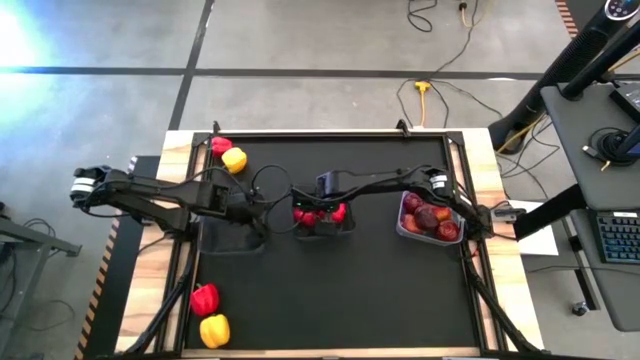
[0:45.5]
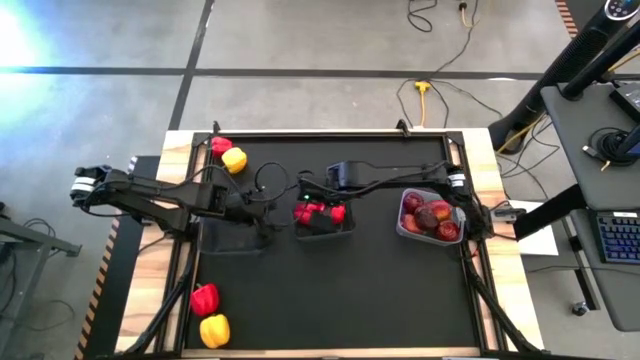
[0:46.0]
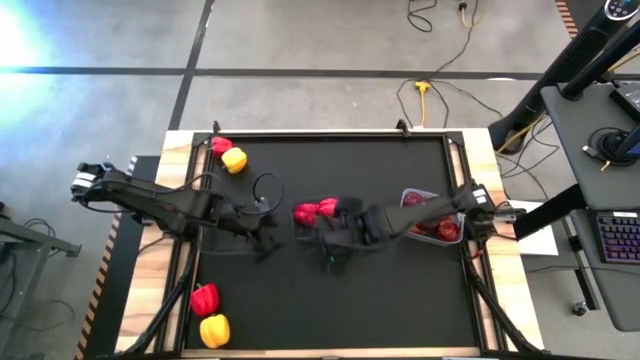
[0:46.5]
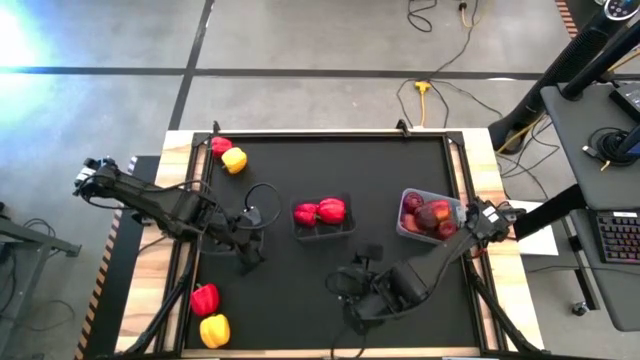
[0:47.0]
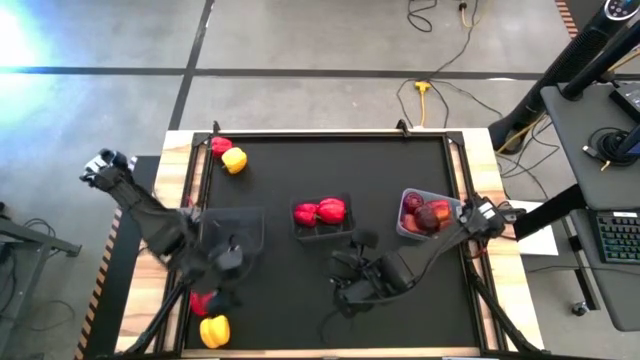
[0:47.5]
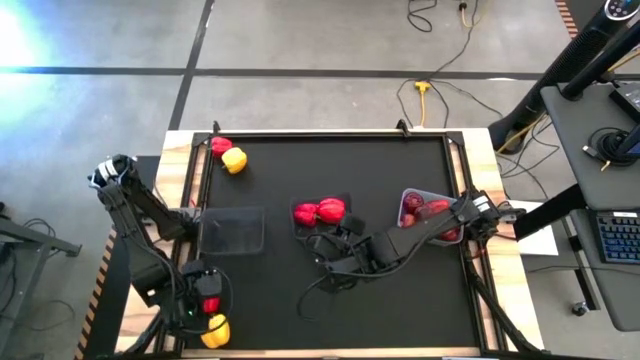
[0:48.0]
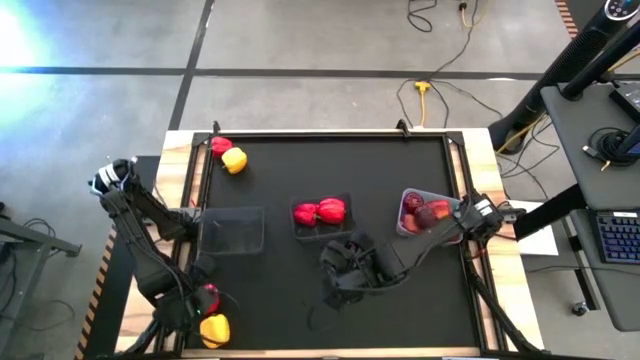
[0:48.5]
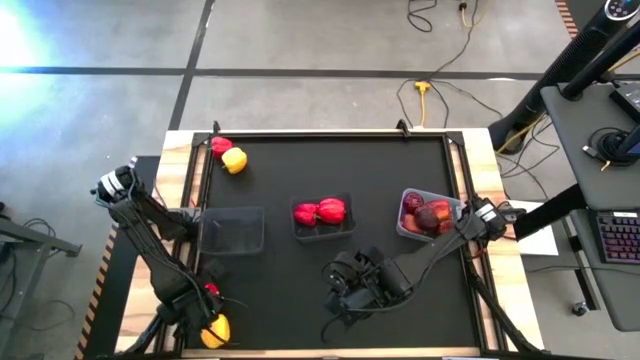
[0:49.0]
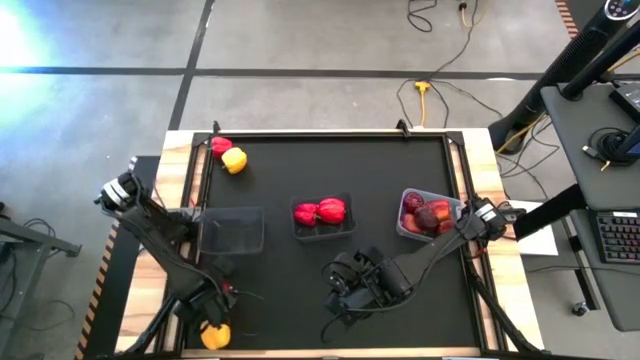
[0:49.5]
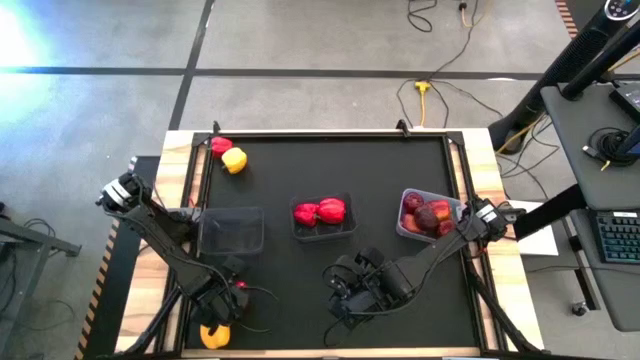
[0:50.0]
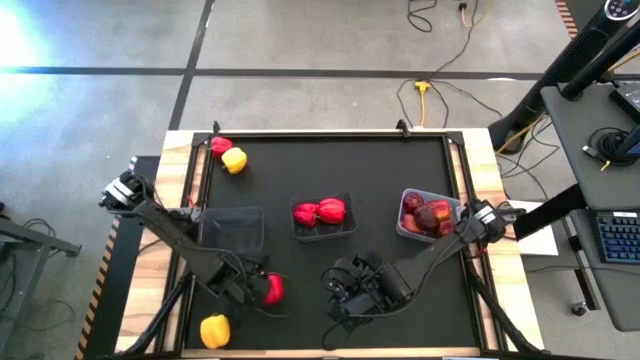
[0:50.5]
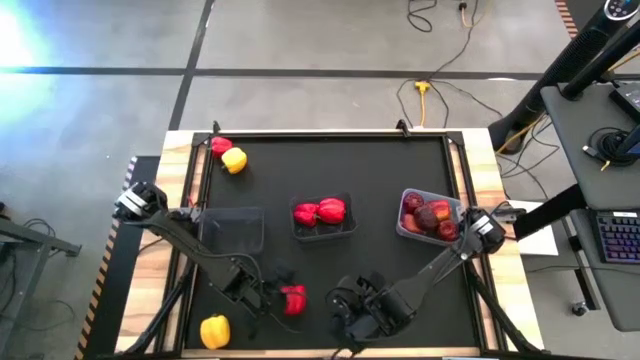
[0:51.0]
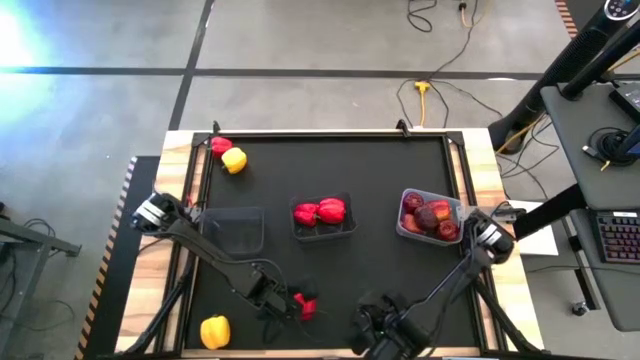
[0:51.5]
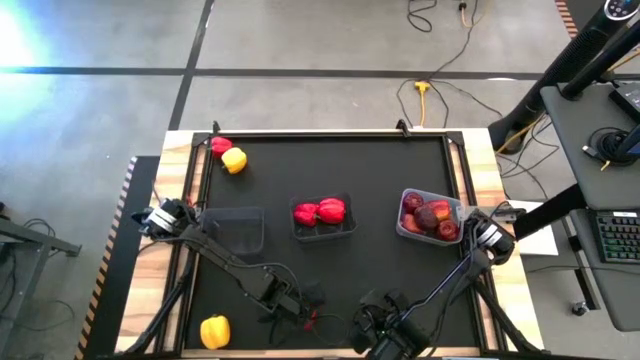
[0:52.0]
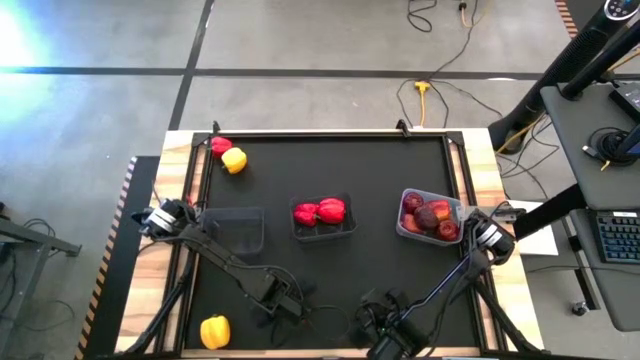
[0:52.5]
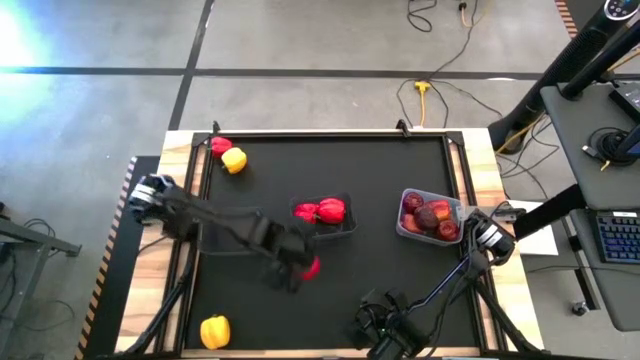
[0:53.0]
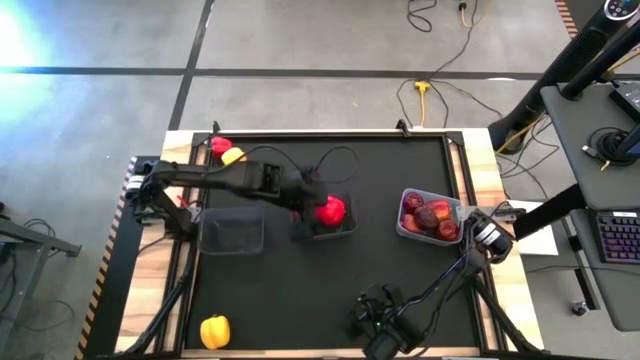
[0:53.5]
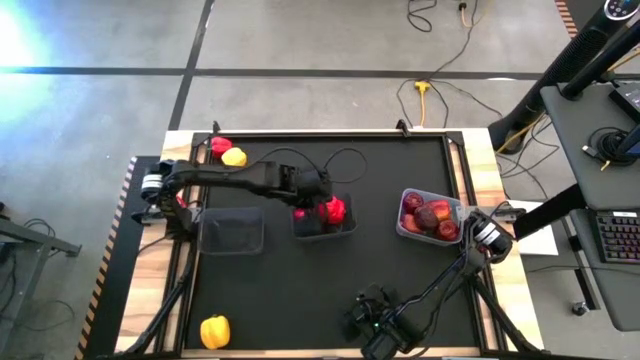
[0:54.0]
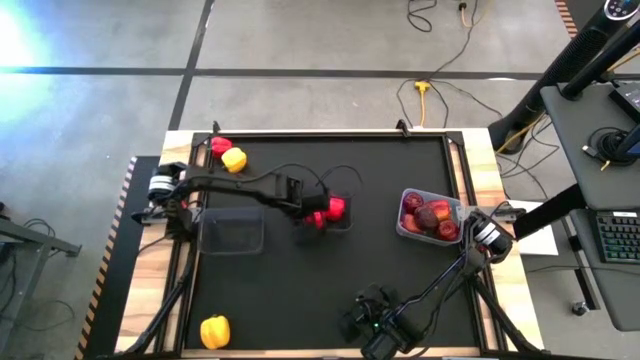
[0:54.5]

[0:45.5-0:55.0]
Task: Sort produce into baskets
Put the red bell pepper into the right black bin

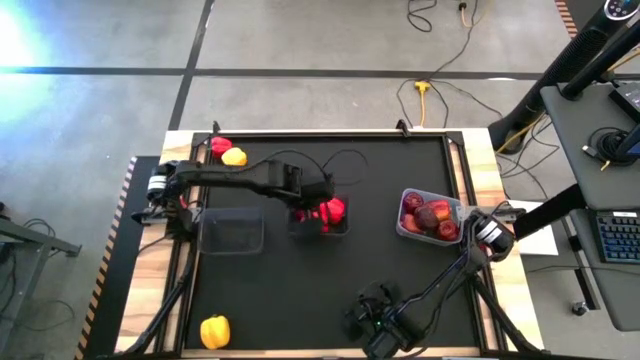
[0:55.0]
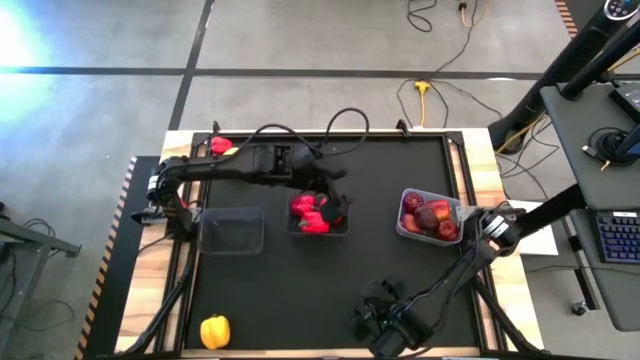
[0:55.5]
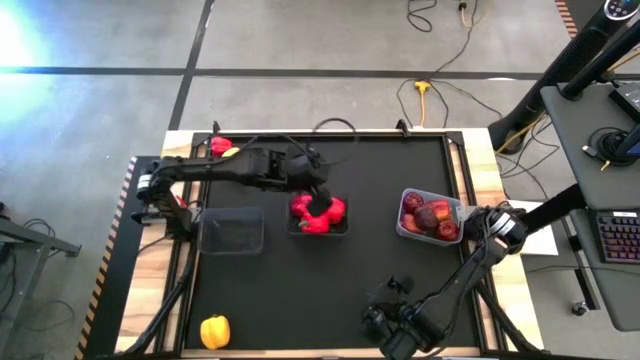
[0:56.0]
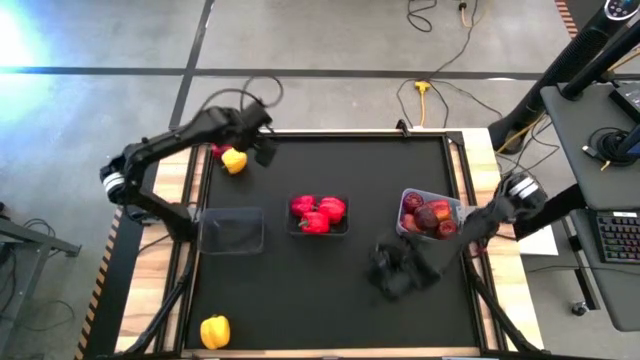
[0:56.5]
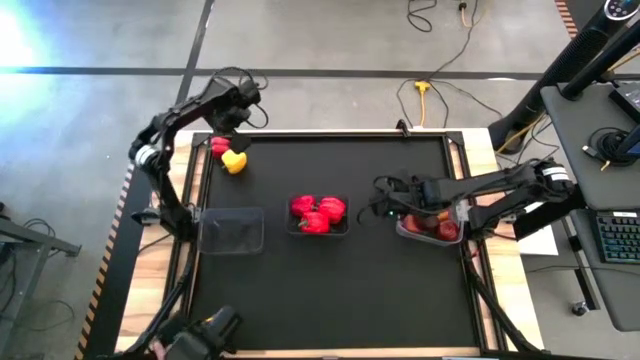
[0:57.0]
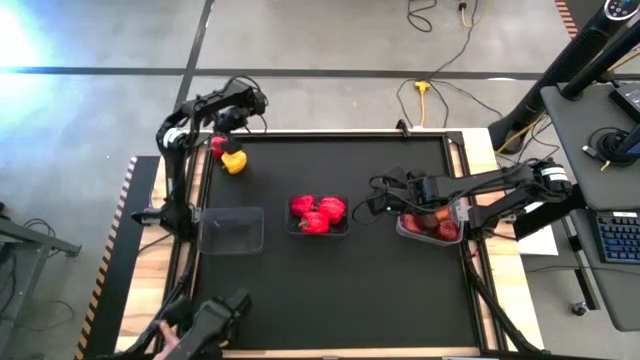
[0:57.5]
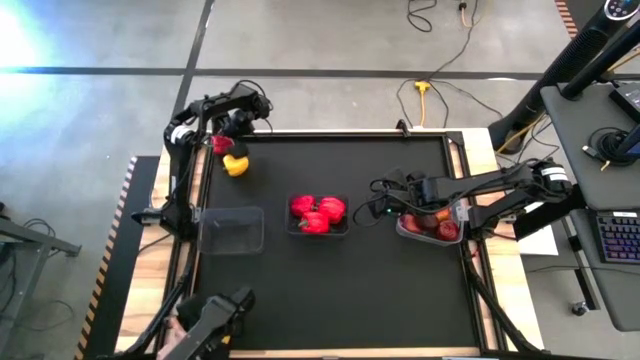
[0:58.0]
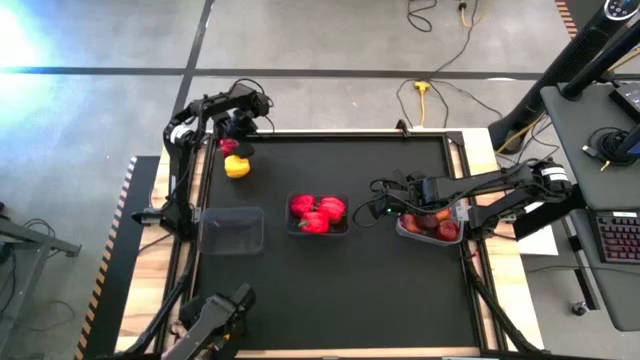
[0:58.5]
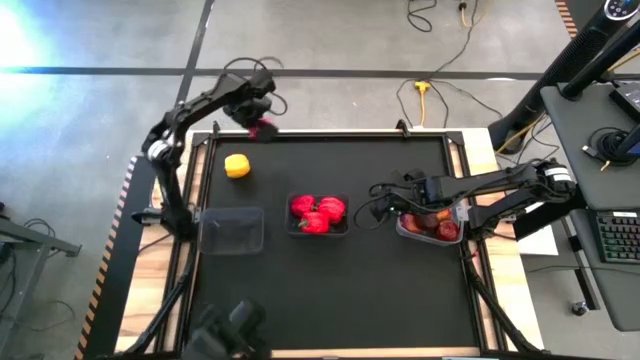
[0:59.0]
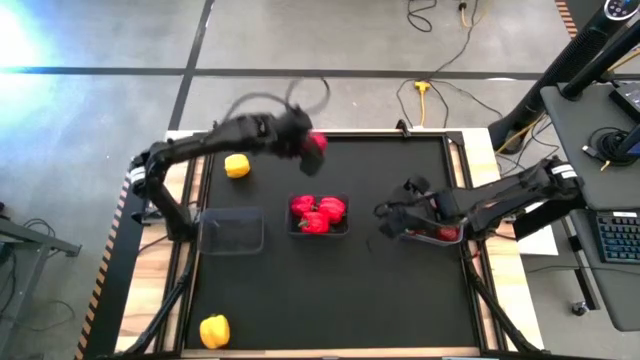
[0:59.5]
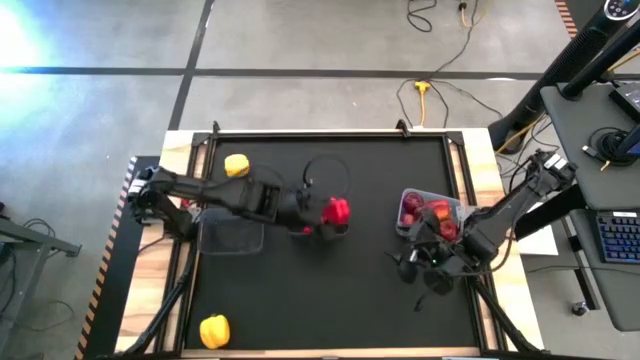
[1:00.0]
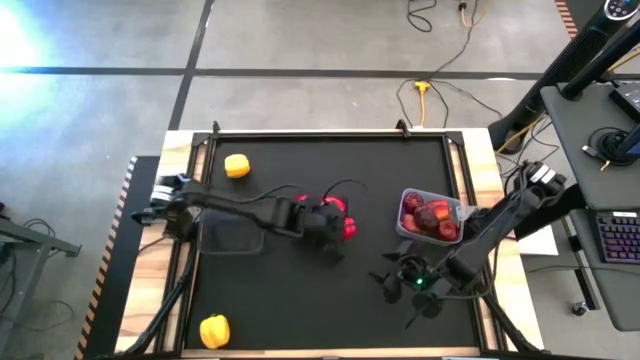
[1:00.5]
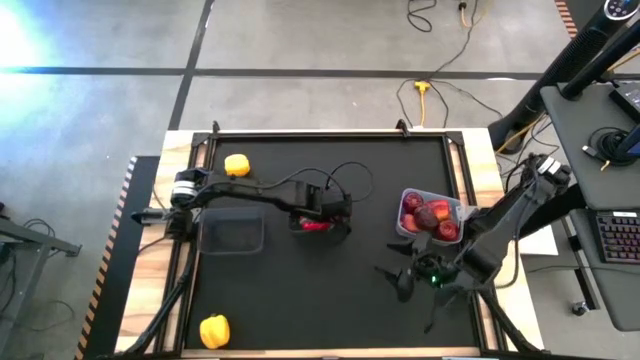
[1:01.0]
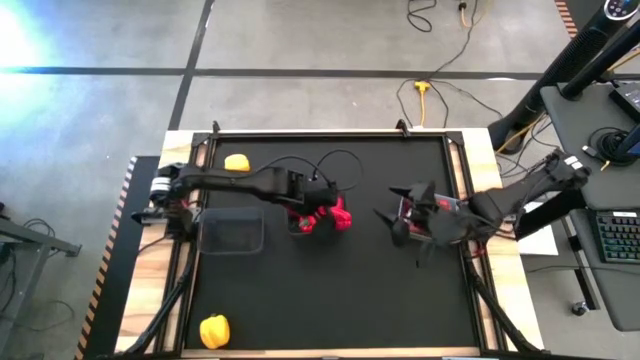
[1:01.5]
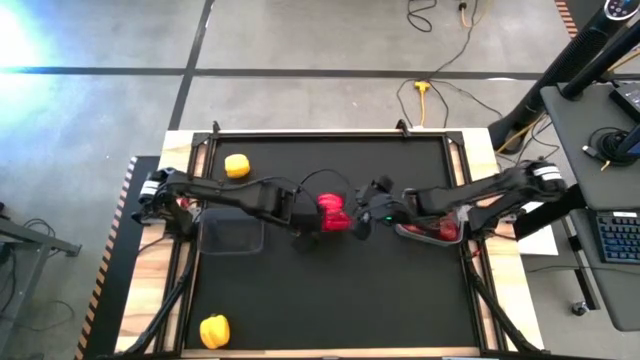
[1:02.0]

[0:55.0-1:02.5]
Put the red bell pepper into the right black bin

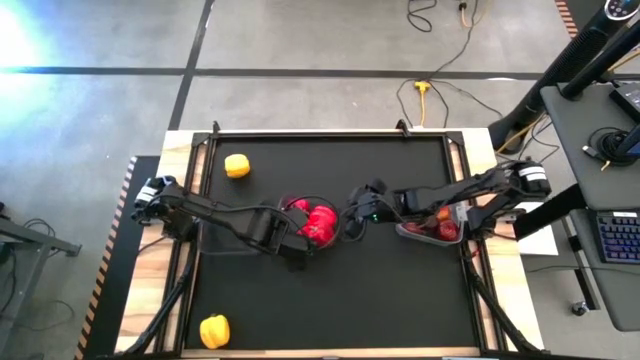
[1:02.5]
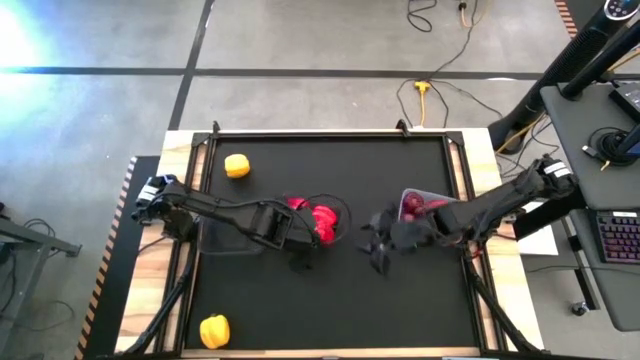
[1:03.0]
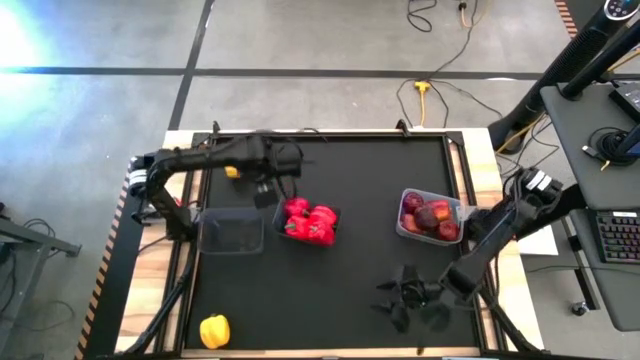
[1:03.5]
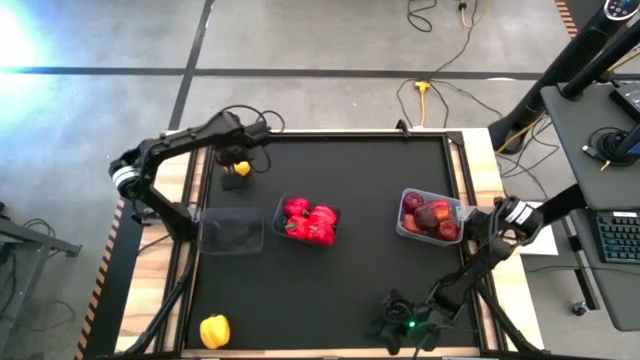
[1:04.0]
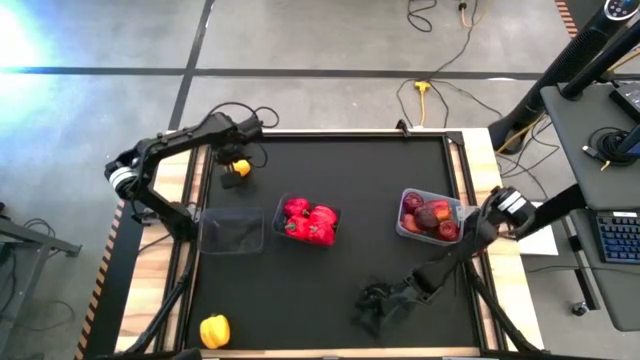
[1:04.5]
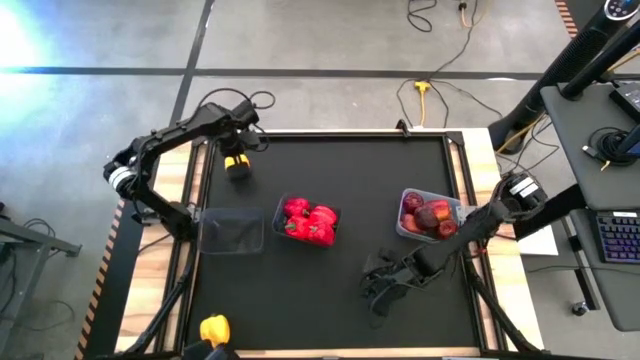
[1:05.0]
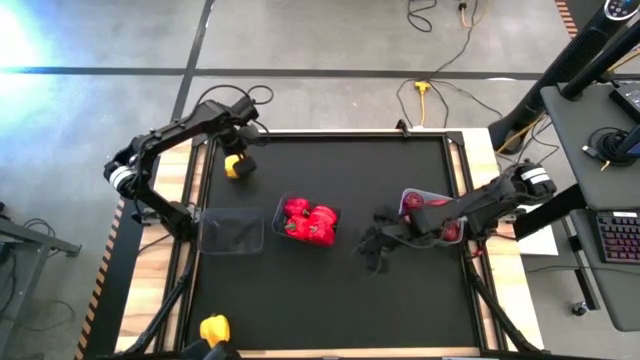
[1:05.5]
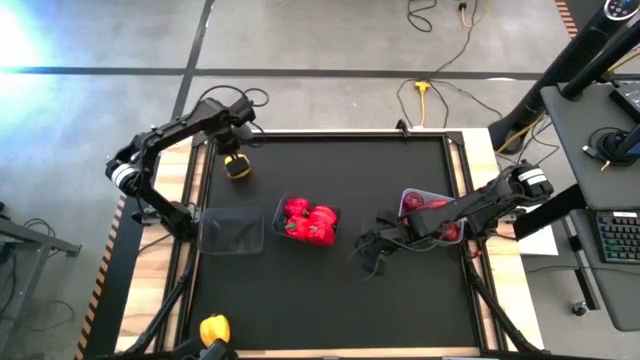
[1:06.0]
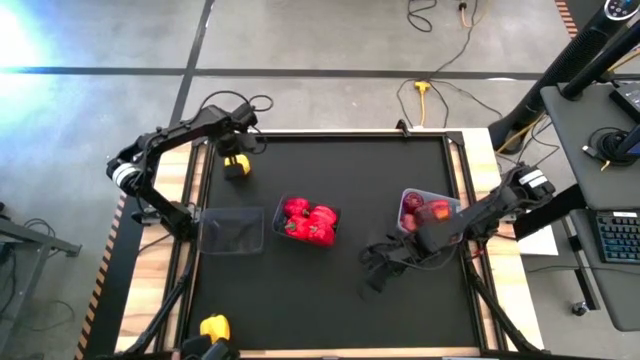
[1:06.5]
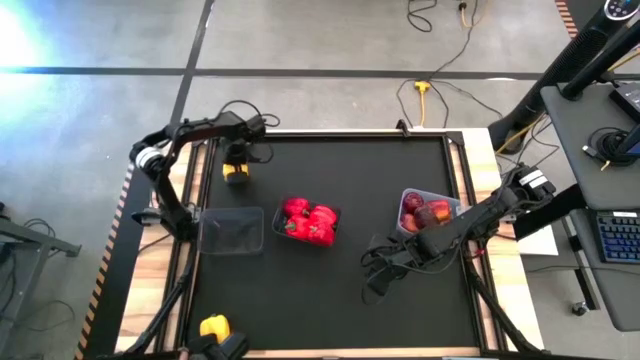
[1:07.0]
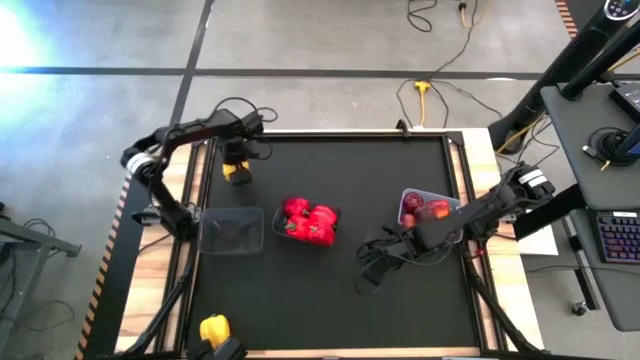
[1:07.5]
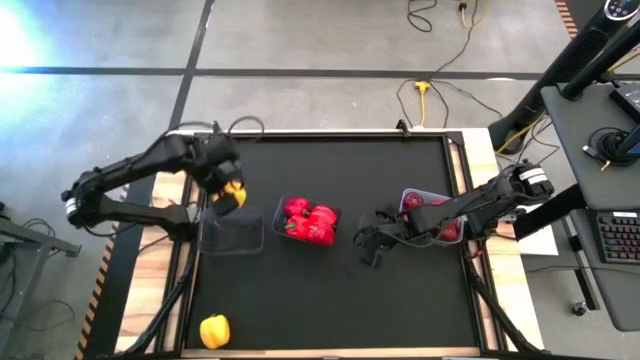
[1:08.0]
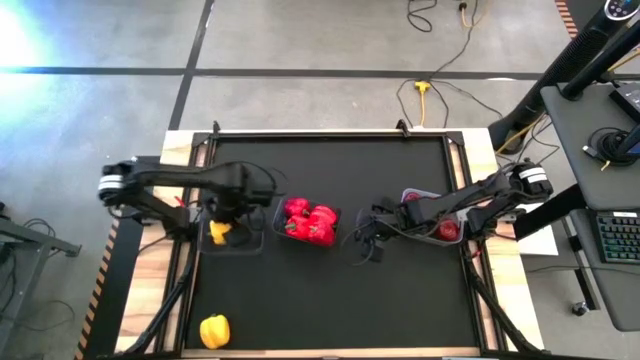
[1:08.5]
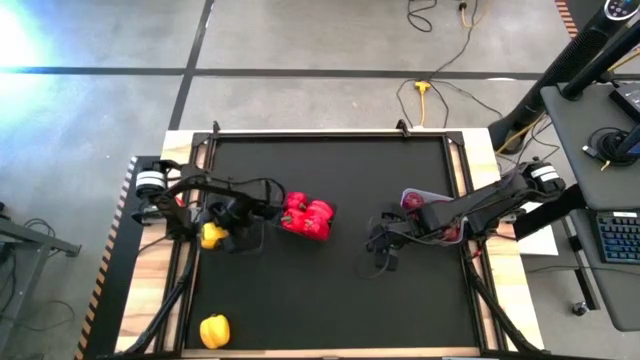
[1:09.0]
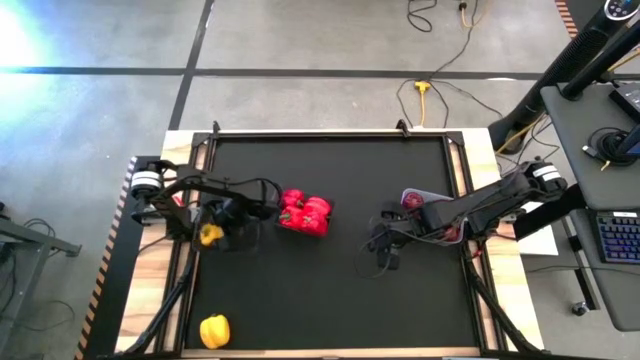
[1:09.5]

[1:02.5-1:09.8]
Put the yellow bell pepper into the left black bin
